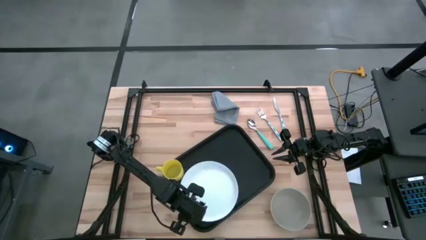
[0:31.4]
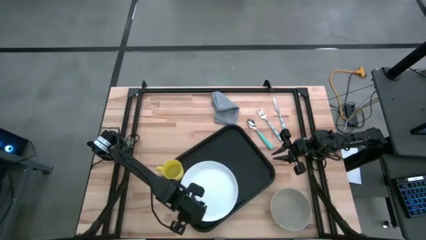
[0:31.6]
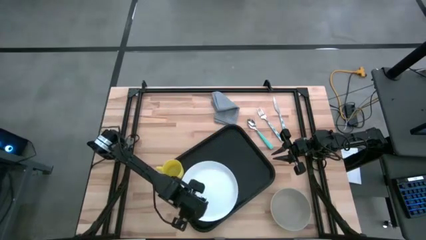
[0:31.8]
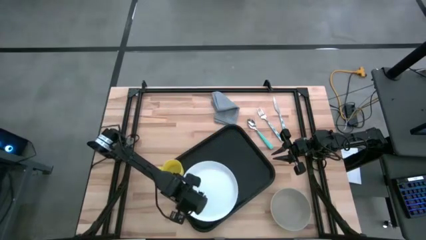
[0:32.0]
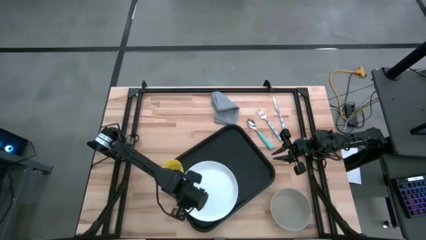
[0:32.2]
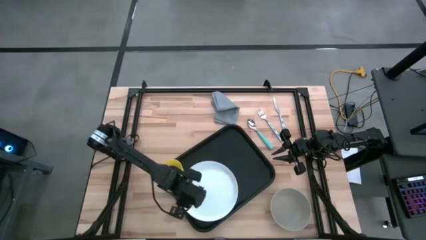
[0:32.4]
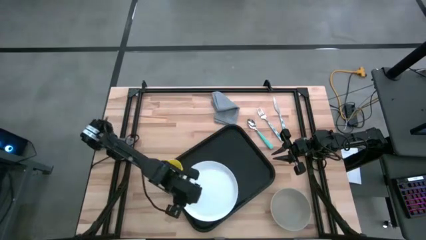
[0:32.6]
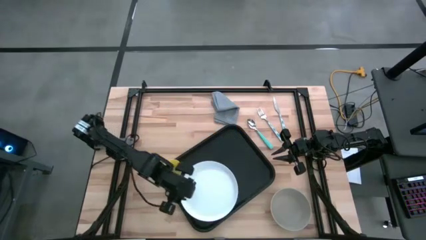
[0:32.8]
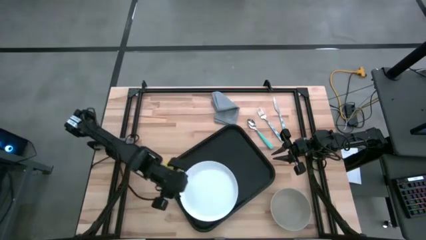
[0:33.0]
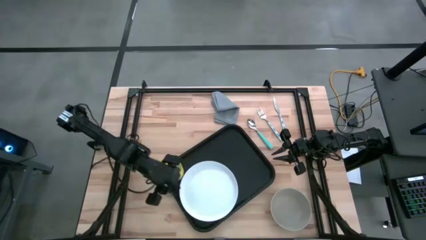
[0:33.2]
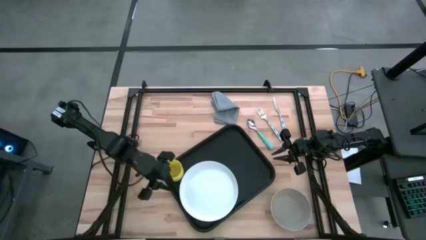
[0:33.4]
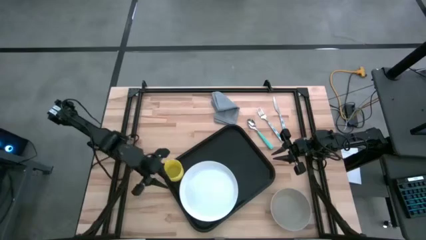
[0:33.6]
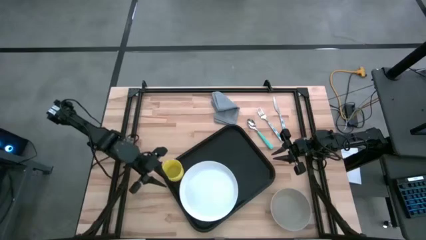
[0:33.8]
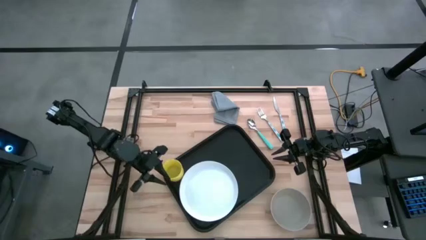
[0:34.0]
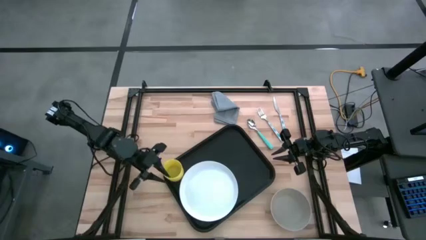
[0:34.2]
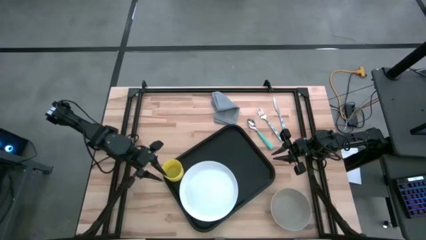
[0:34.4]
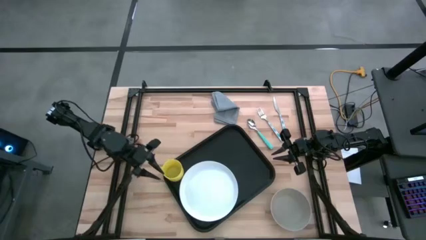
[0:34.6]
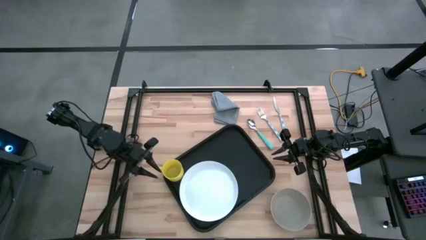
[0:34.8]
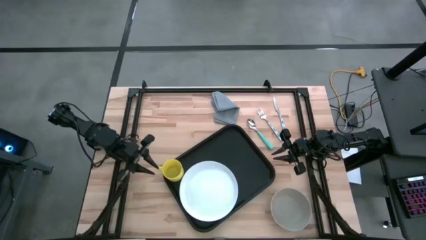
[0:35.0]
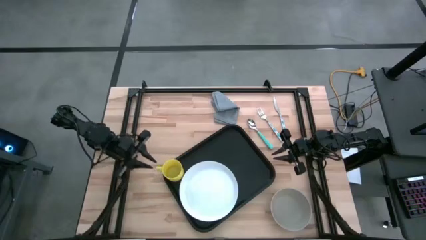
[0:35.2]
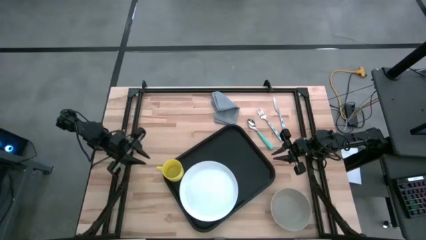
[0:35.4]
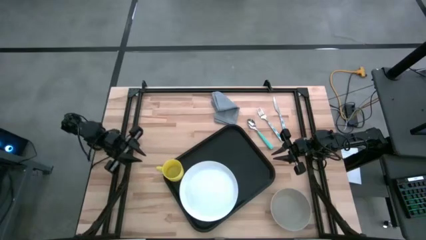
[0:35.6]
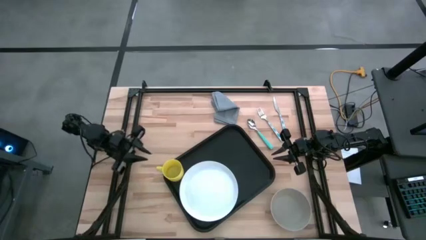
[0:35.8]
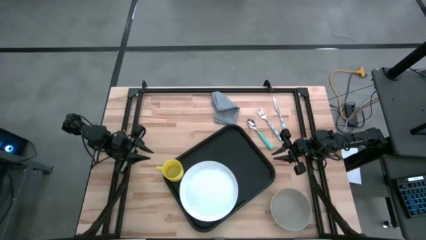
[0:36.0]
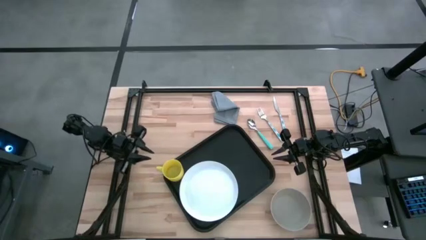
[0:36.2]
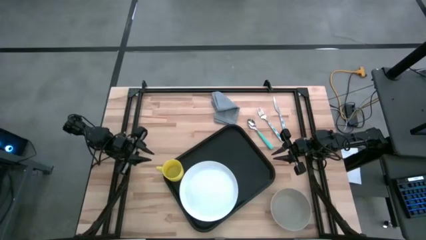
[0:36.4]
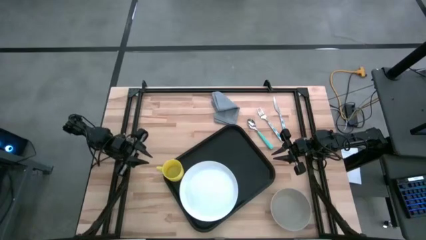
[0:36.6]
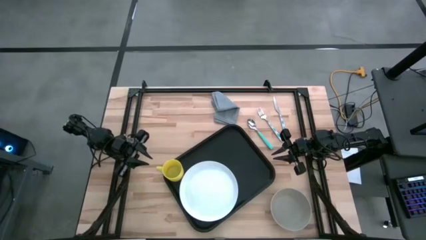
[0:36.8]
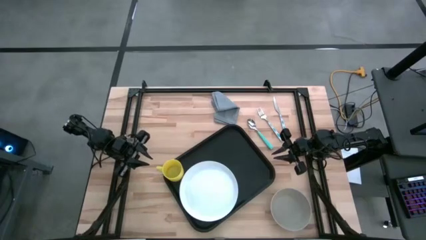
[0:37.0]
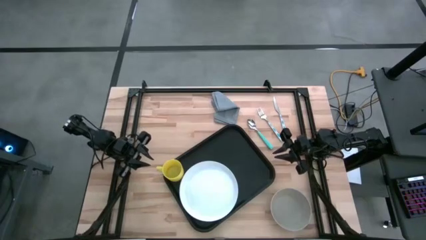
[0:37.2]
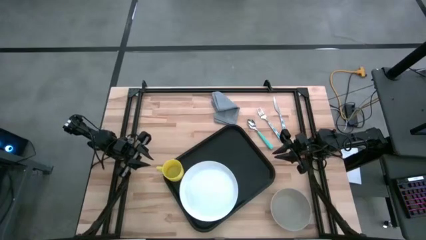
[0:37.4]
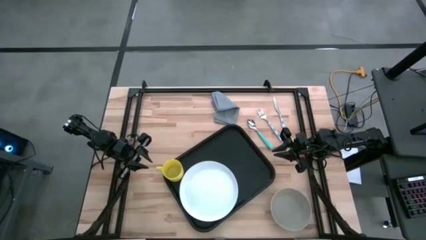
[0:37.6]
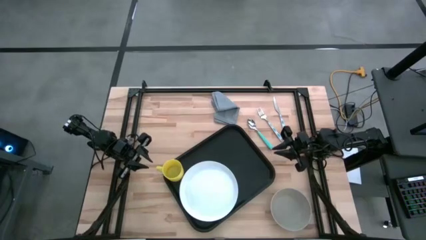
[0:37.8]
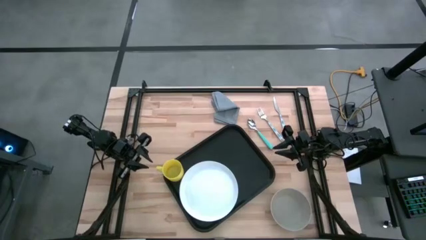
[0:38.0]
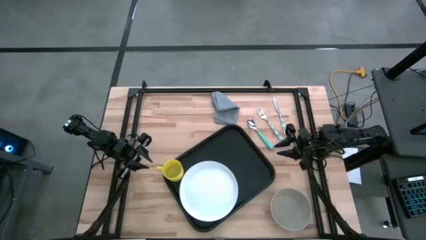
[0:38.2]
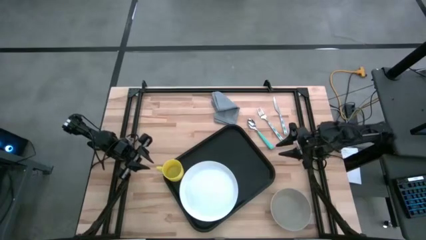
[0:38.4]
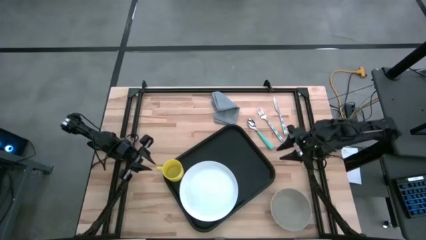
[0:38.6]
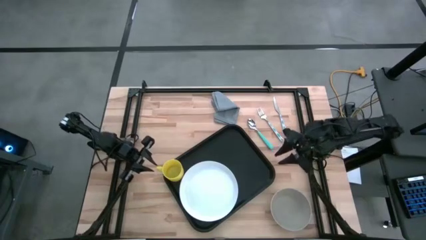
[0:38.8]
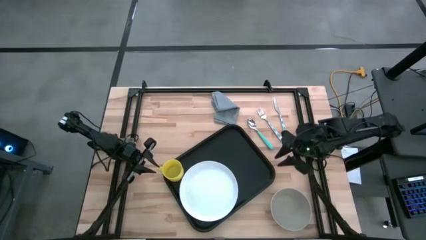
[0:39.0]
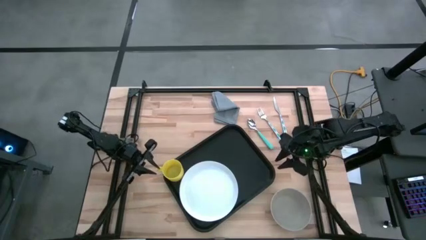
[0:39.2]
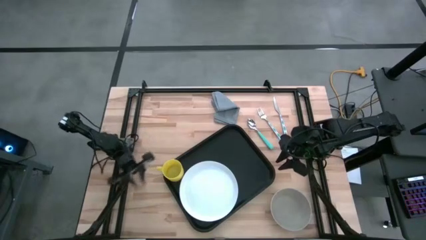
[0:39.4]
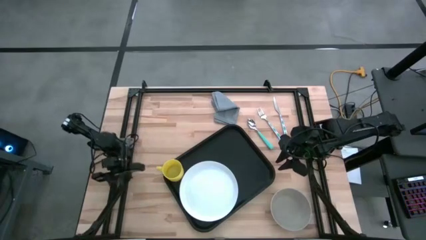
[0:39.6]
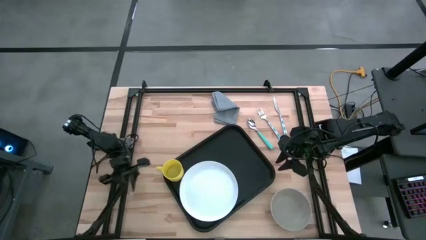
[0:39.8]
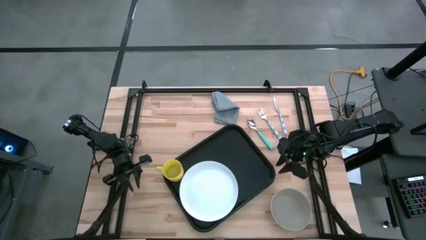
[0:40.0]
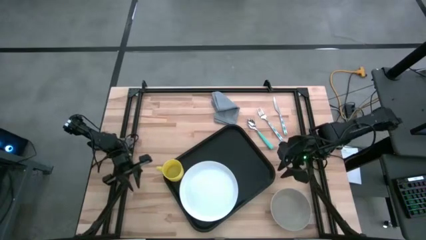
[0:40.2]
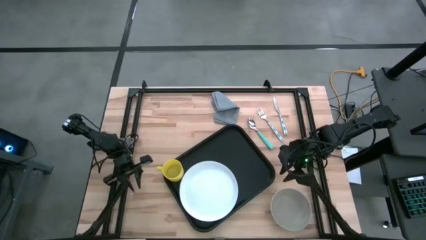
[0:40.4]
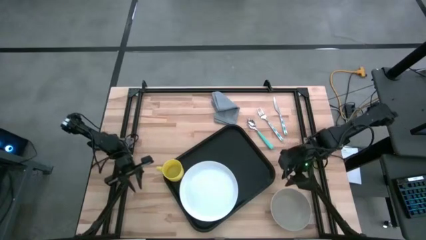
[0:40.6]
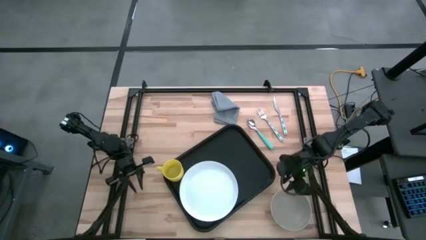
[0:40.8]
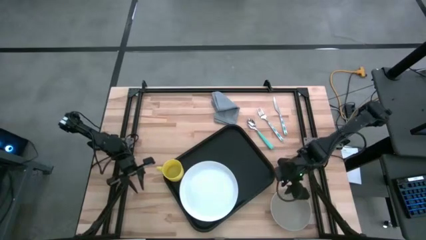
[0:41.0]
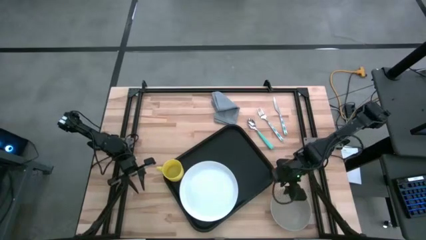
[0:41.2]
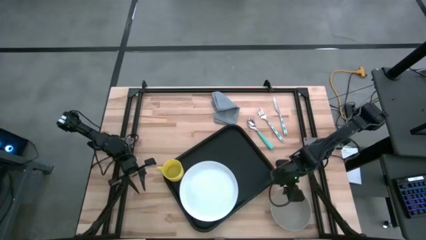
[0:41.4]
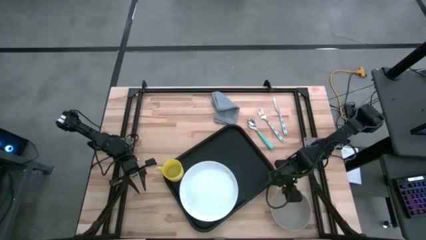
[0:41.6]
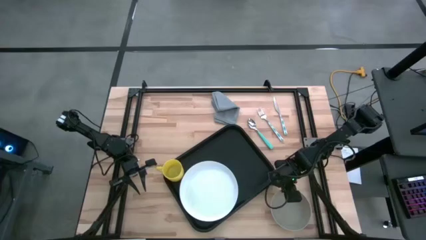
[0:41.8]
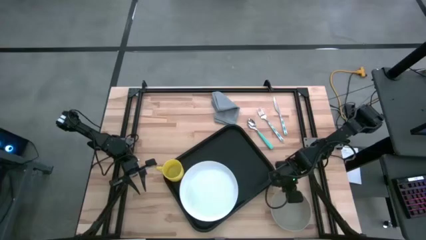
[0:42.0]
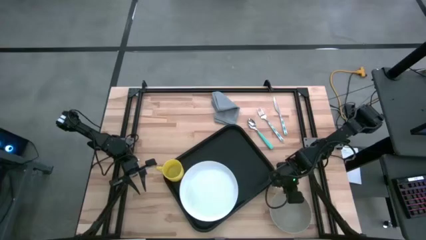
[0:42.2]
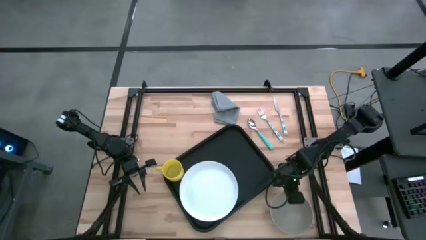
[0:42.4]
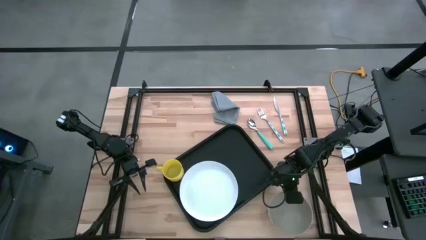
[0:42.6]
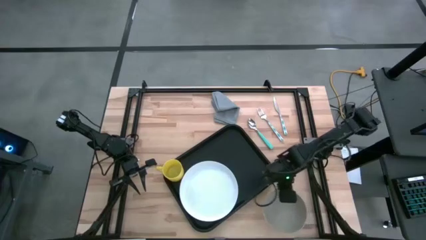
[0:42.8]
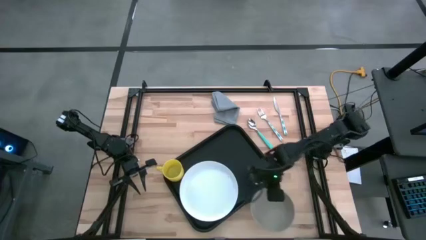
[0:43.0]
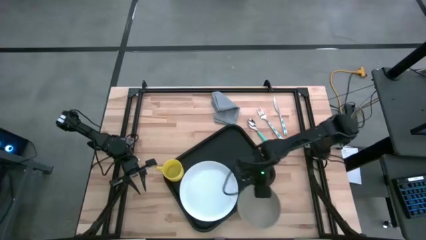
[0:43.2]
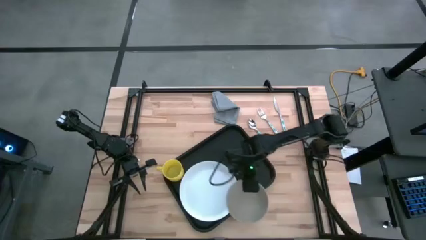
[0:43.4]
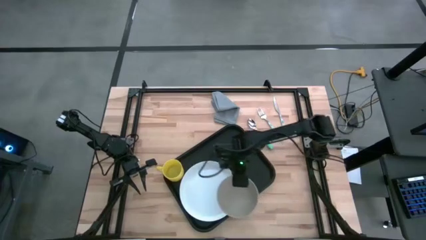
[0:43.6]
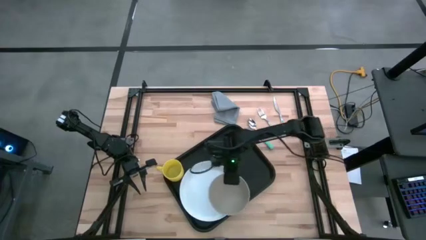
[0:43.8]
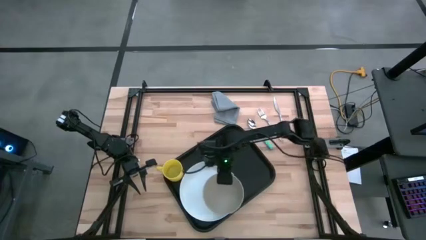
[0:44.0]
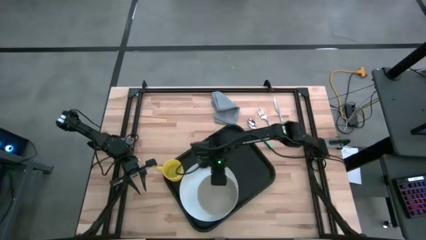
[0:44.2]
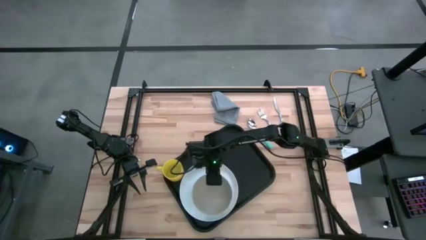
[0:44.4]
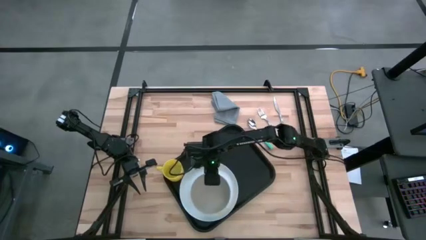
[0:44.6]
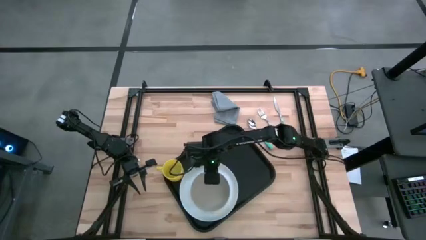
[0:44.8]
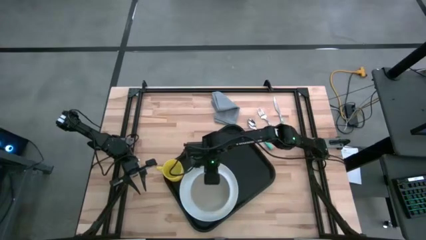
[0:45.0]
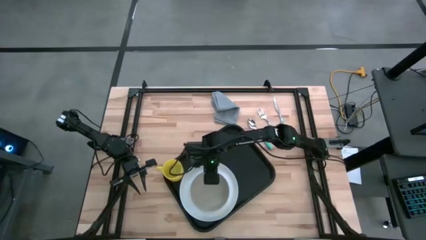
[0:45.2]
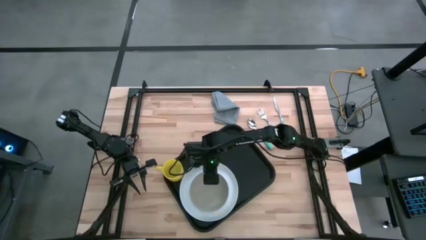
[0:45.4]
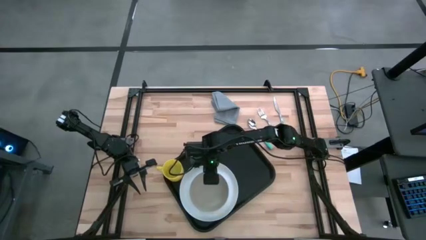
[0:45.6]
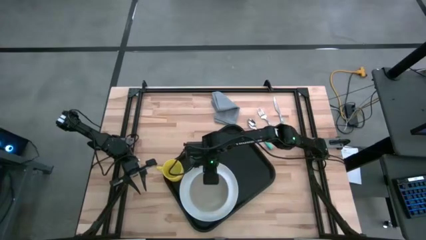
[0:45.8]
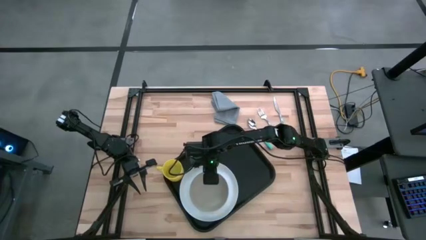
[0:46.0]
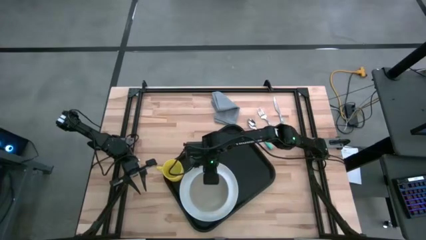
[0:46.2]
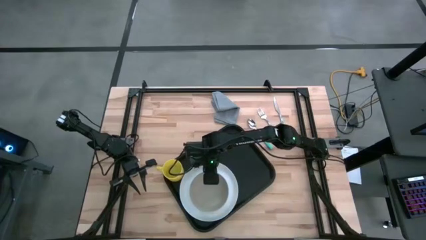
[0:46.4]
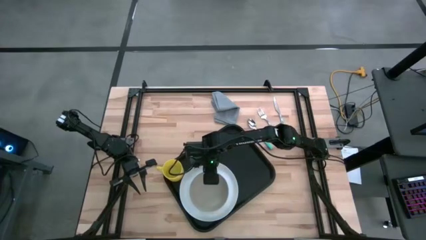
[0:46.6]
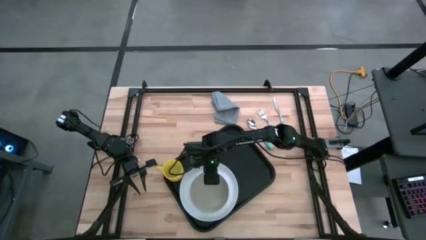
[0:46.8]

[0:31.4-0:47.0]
Task: Set up tray
Put the gray bowl on top of the white plate

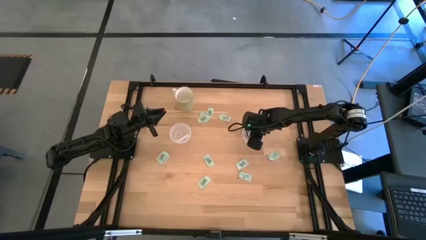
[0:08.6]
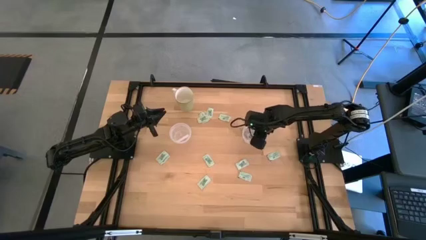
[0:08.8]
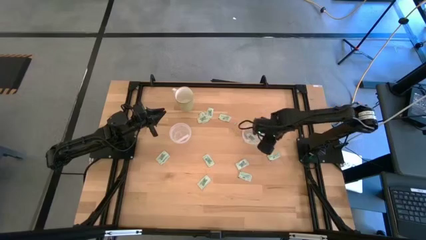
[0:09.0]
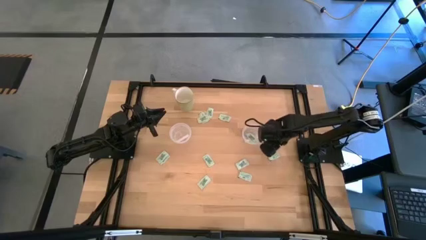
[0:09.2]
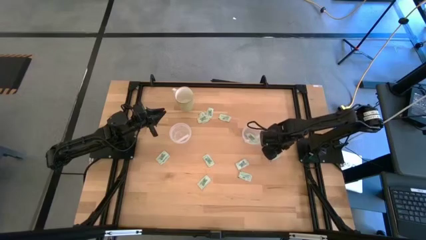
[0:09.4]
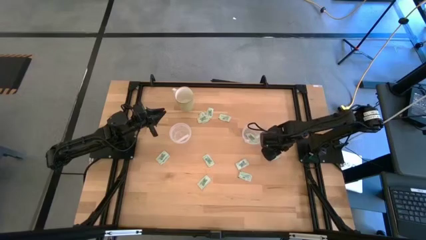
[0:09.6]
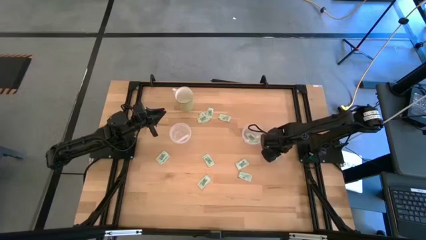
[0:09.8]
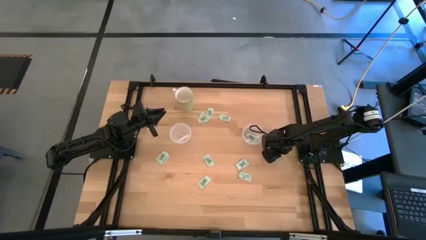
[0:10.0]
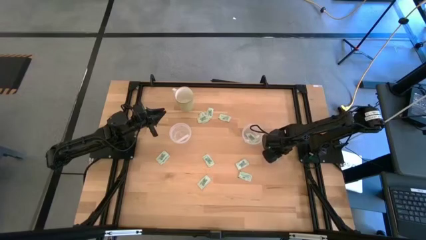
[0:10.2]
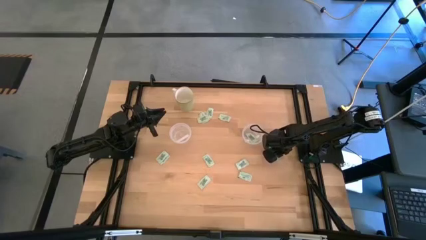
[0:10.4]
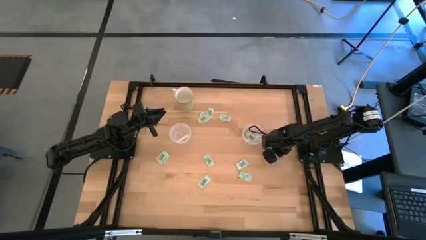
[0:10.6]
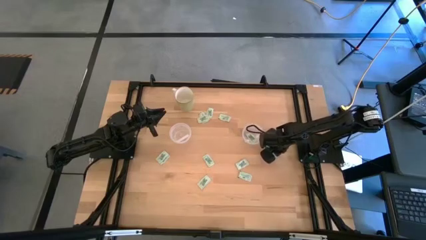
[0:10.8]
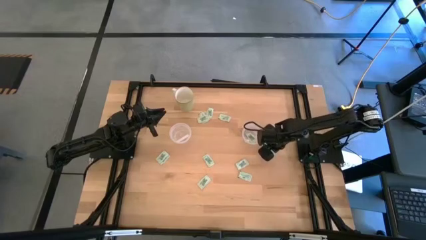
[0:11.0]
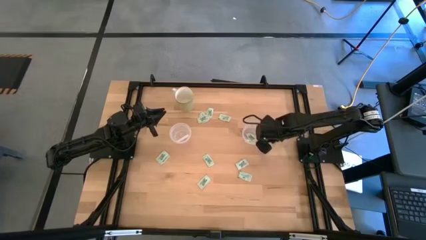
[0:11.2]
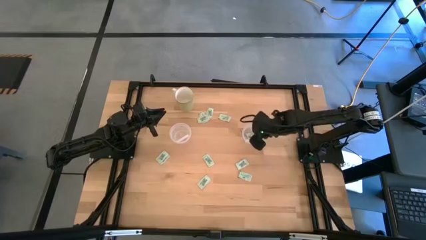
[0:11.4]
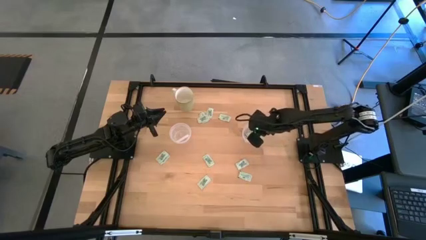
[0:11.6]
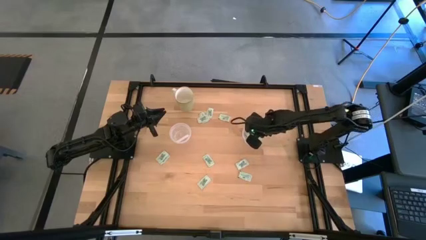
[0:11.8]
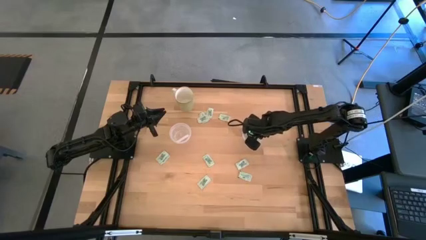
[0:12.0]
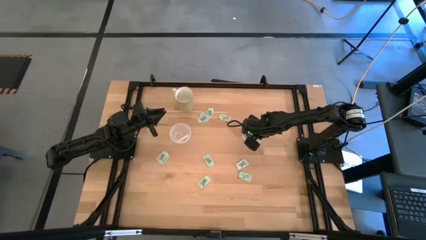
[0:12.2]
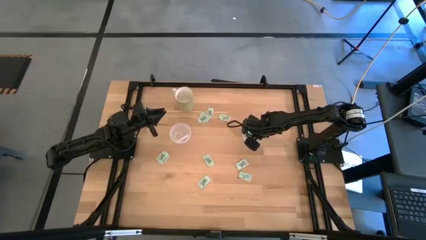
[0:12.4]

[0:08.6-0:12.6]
Task: Pick and place Stevia / Truvia into bins
Put the stevia packet into the right transparent container
